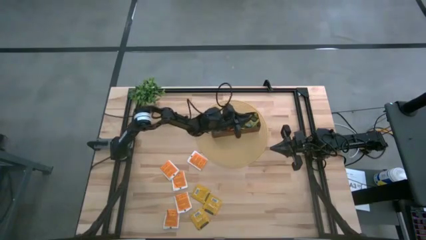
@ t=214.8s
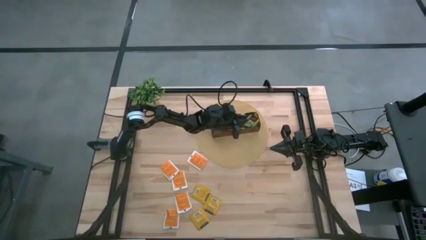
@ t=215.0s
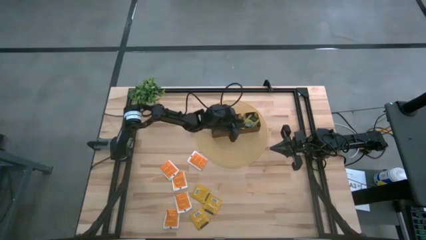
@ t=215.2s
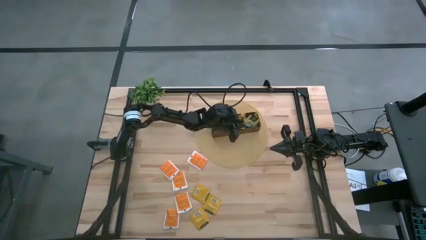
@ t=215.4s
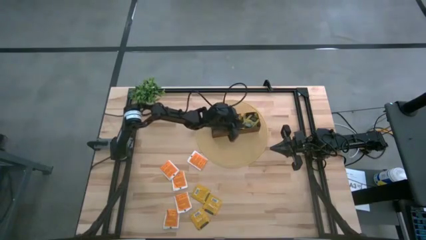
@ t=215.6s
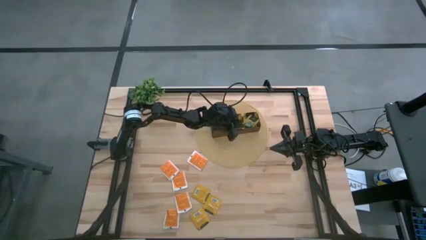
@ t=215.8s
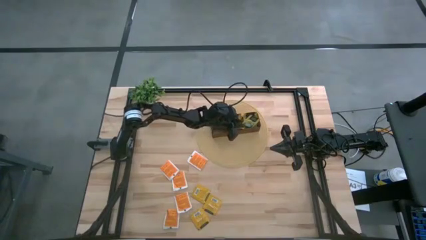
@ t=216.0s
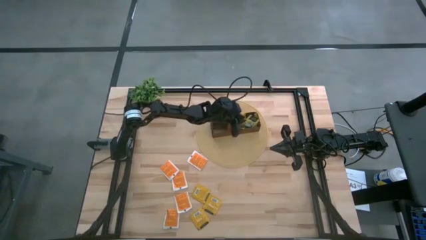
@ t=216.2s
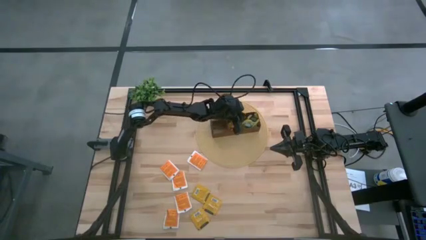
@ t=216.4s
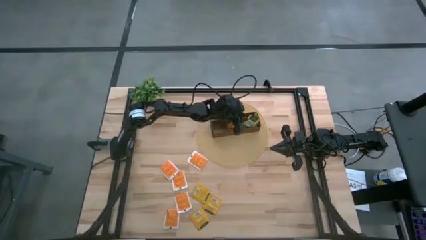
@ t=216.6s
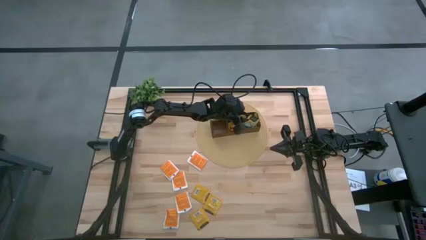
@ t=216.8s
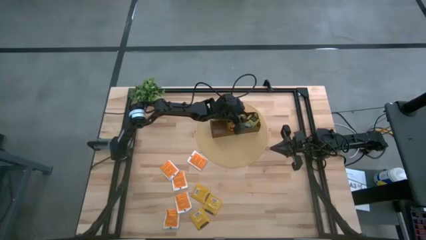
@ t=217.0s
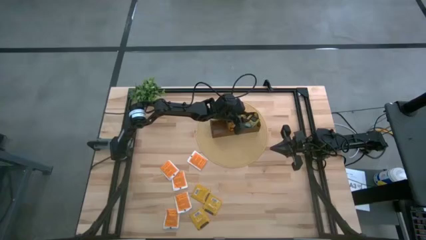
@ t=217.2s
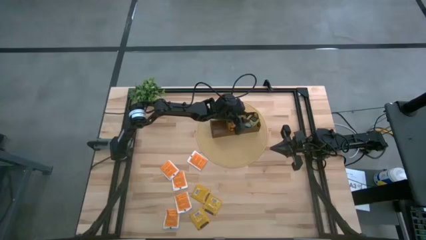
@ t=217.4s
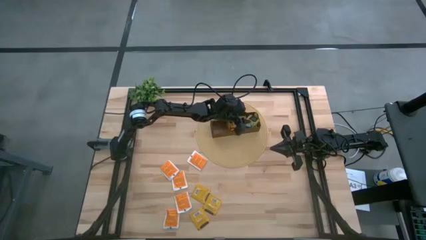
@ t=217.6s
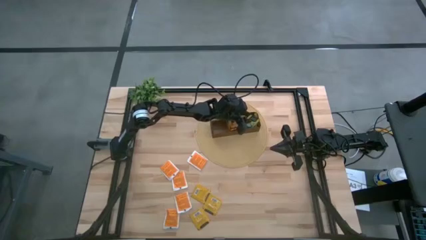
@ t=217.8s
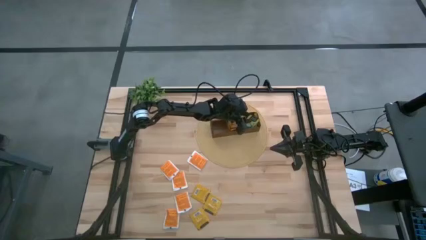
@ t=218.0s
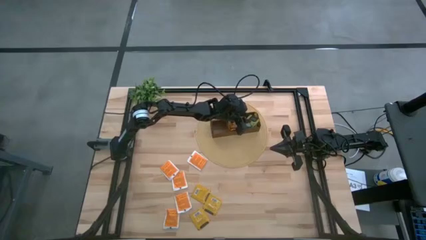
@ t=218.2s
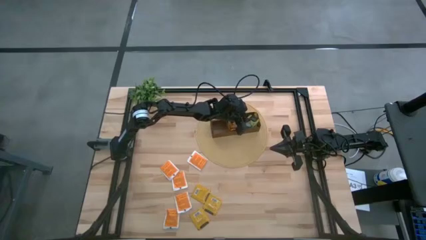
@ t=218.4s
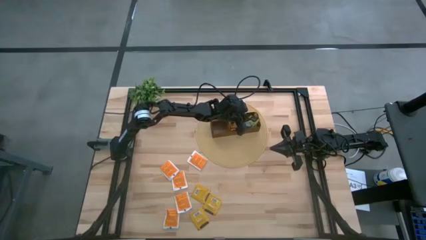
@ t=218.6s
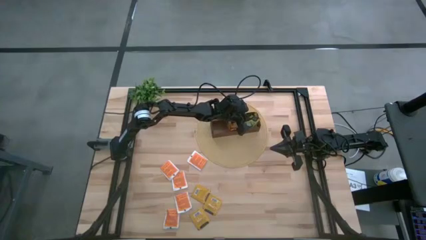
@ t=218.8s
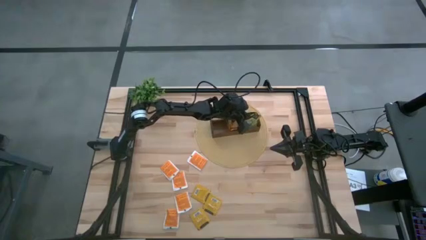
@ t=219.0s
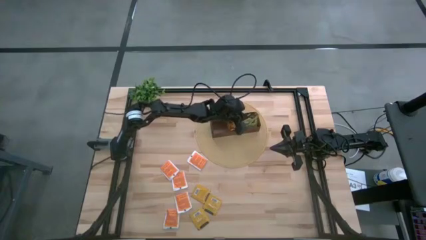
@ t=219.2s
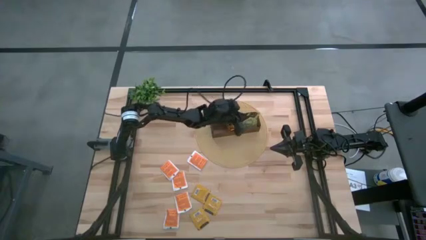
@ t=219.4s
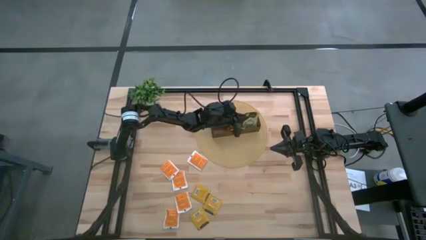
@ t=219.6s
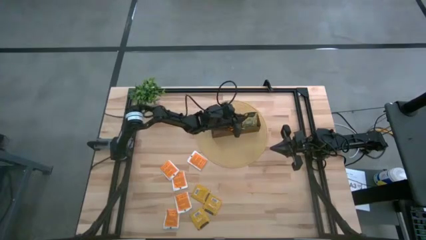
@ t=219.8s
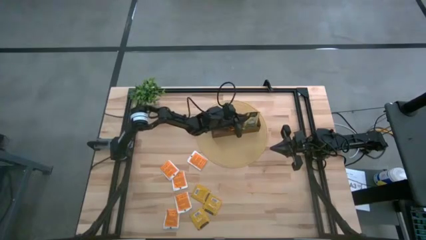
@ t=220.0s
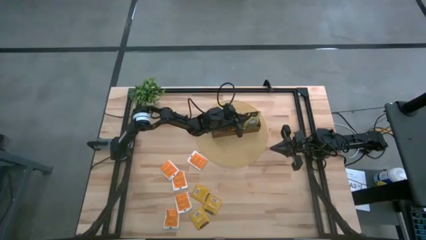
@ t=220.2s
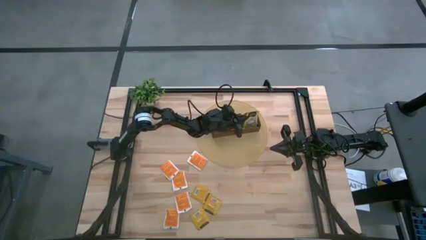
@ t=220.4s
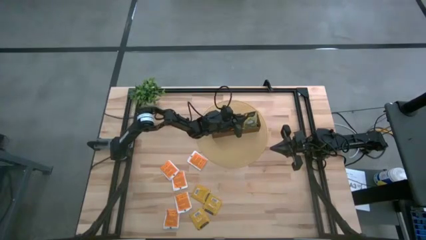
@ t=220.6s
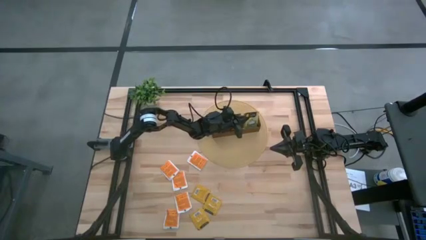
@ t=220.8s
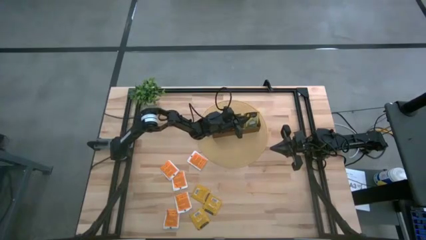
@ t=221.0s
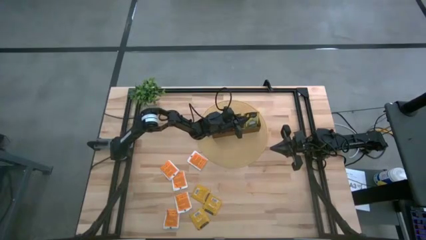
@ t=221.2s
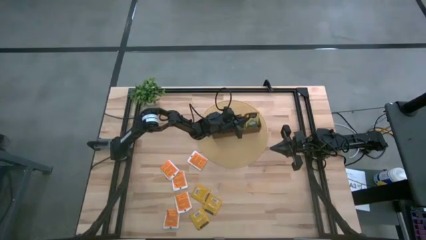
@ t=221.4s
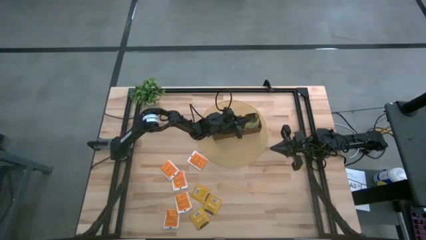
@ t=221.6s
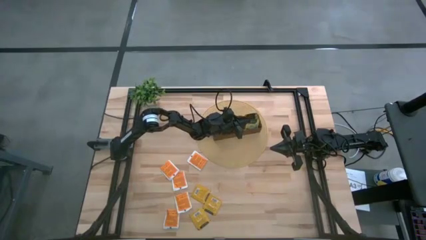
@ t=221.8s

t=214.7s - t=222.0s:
Task: Pick & Place Tea
Adjust the yellow tea bag in the right section of the wooden organizer to align the position

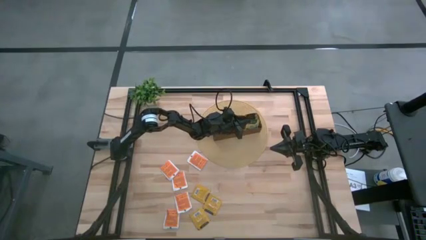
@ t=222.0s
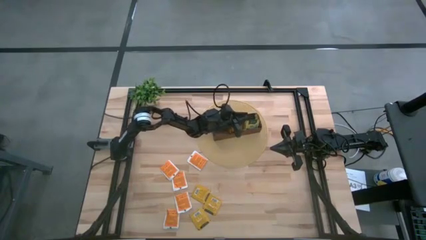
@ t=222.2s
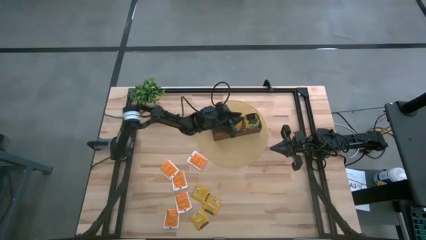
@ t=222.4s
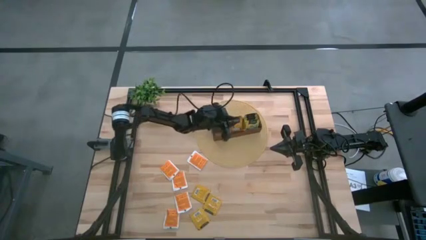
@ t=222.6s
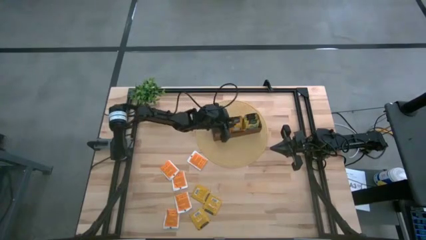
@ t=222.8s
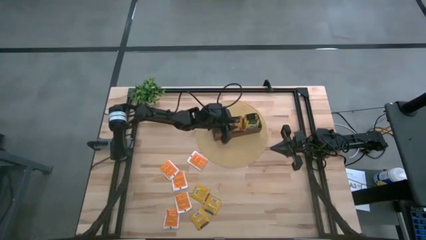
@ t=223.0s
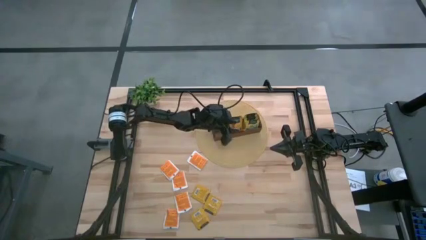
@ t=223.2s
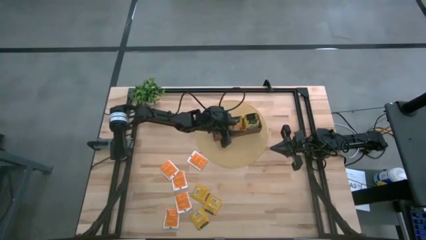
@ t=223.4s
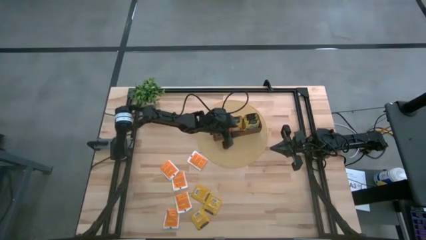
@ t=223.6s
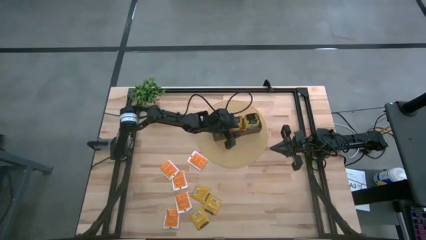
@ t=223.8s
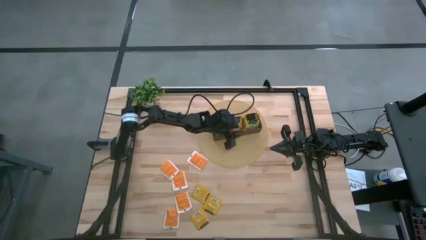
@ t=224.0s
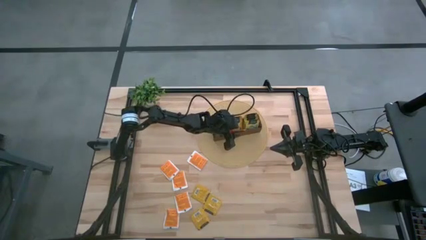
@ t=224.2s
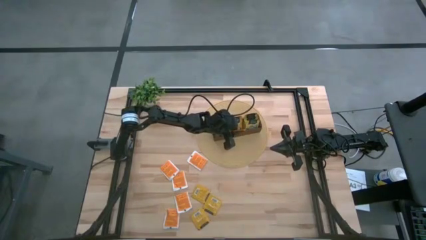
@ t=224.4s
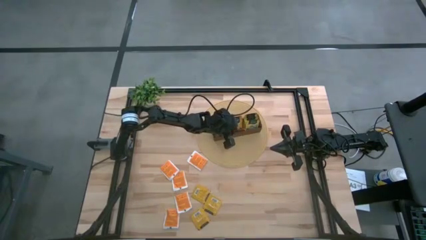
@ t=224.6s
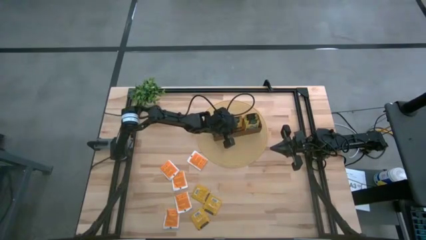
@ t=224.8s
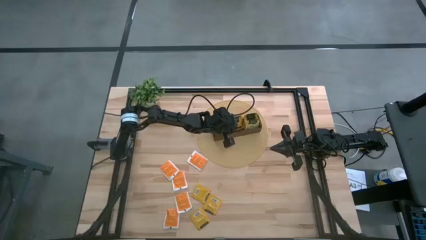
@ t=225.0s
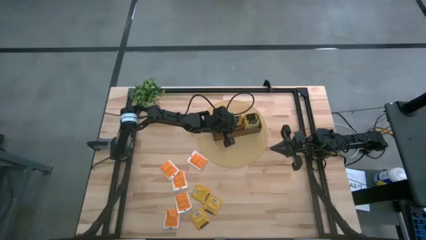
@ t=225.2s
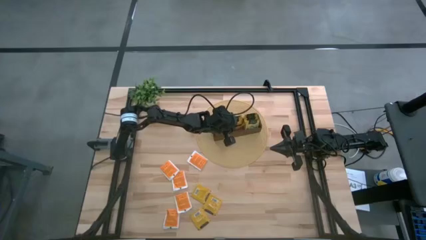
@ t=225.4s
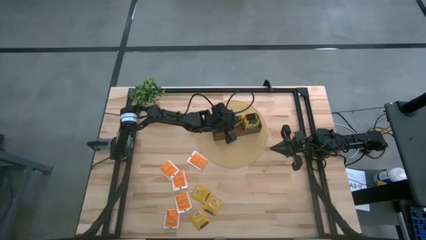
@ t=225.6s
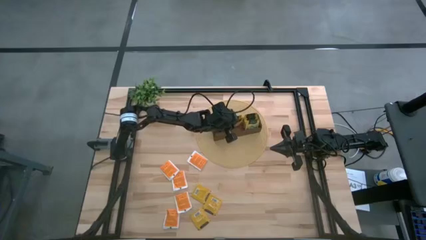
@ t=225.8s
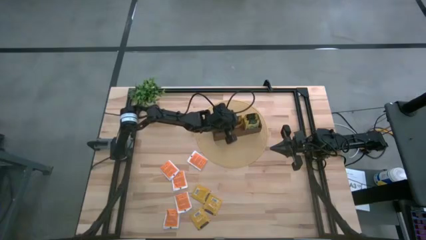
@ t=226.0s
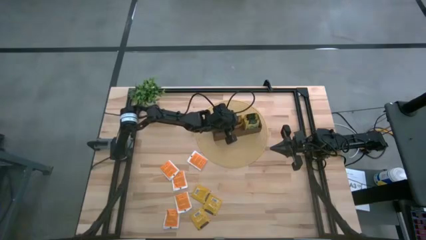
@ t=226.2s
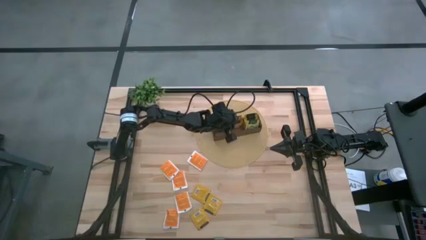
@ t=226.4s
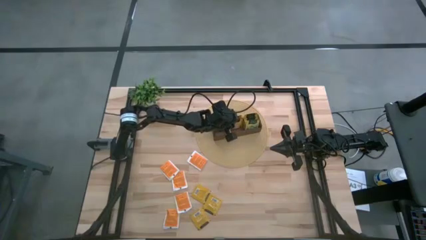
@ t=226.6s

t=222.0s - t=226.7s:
Adjust the orange tea bag in the middle section of the wooden organizer to align the position

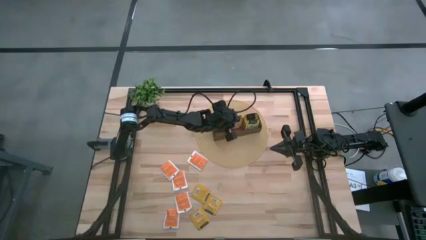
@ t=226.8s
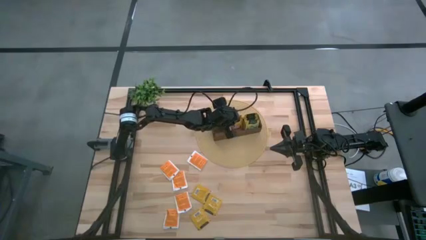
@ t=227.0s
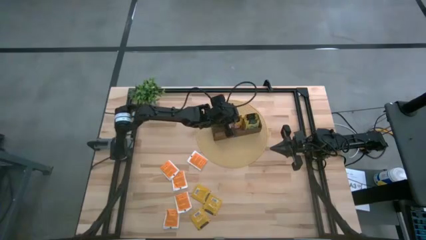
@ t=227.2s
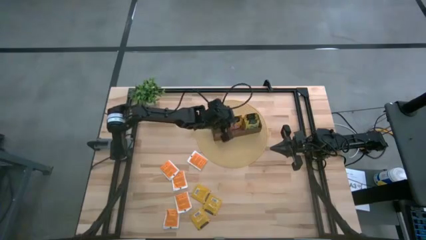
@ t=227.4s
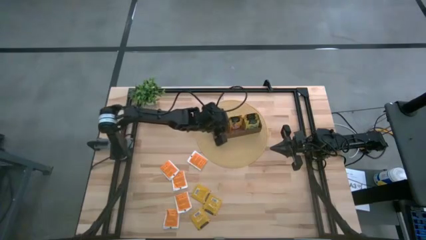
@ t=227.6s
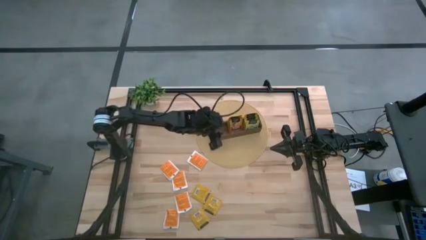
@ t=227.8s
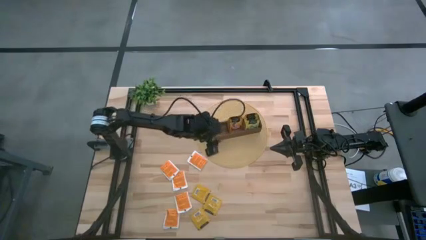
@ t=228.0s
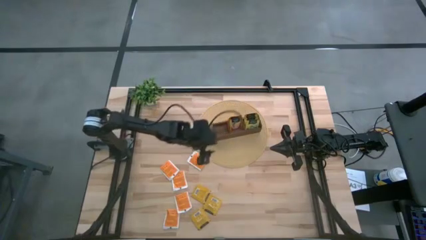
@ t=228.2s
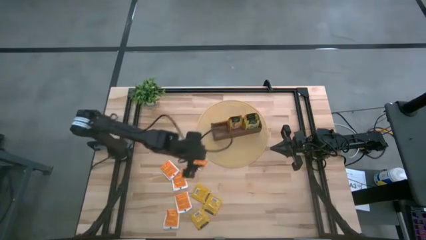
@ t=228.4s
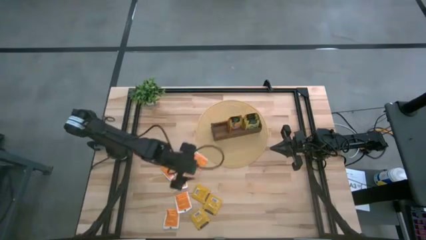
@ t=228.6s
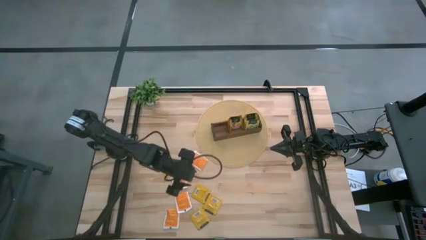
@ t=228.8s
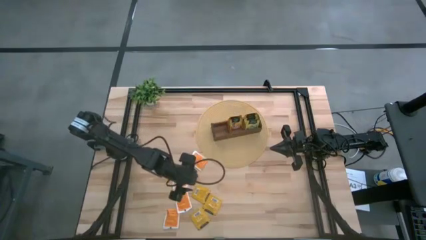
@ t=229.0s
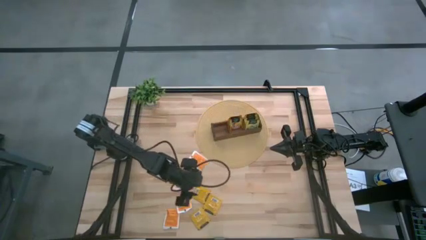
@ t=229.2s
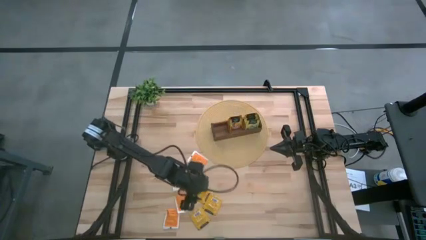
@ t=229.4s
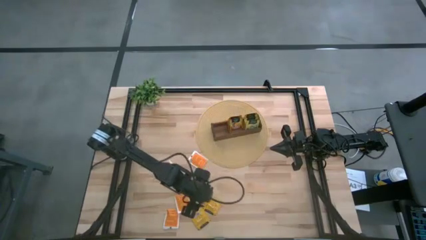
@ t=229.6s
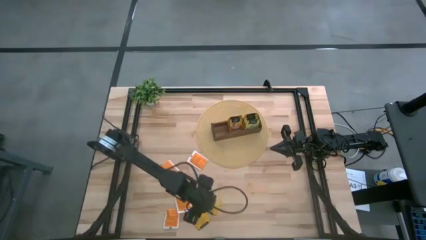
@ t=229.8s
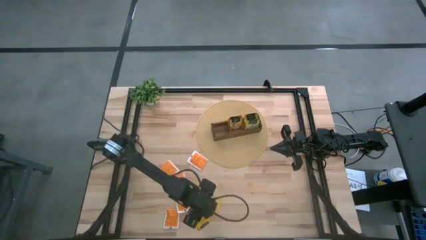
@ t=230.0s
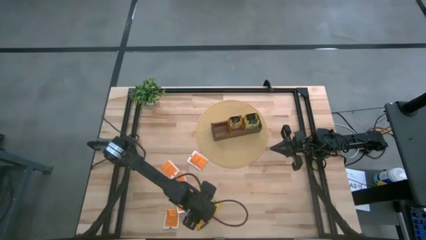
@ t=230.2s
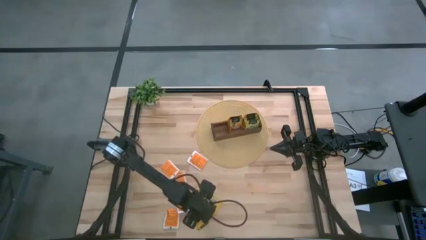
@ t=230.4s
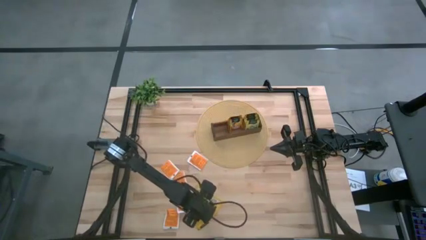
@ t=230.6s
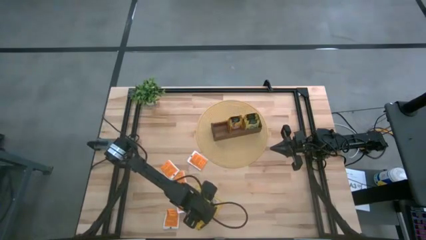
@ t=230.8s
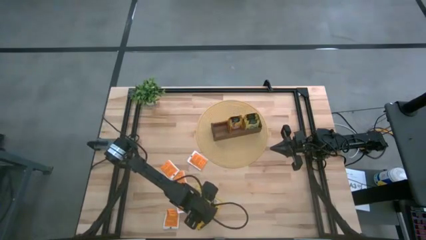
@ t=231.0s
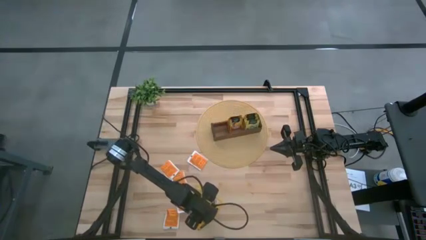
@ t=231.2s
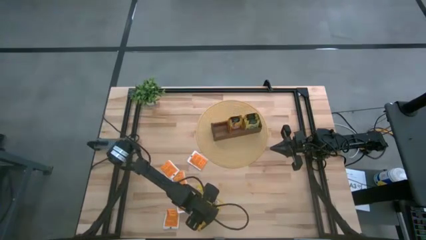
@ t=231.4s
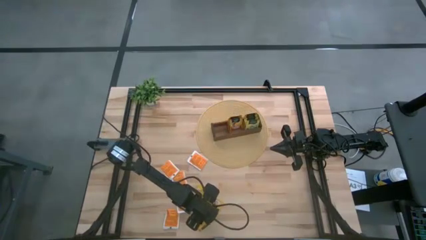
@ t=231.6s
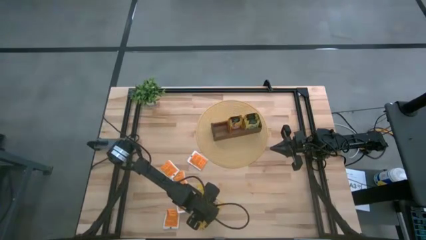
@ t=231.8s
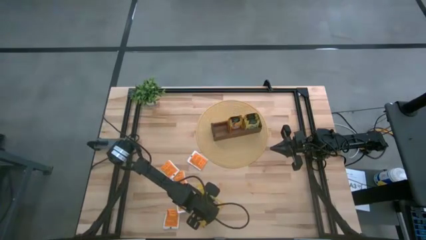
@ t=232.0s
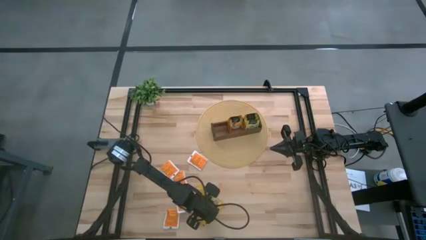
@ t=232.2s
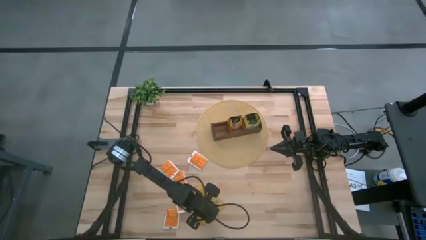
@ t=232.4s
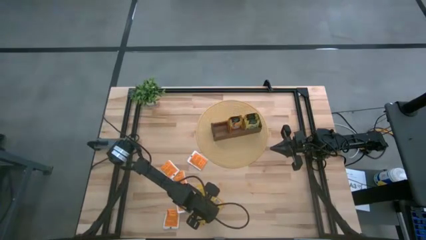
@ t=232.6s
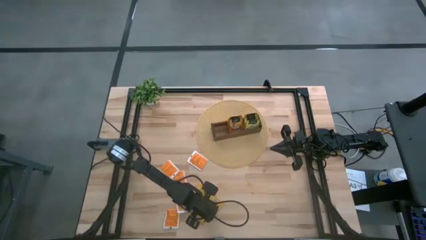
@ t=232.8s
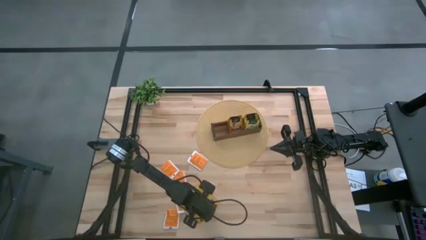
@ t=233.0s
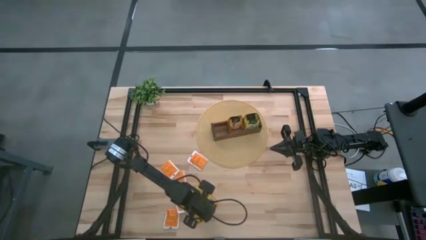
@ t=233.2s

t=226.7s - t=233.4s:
Put the middle orange tea bag into the middle section of the wooden organizer
